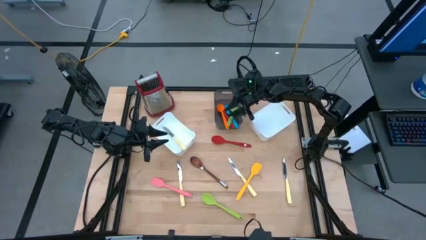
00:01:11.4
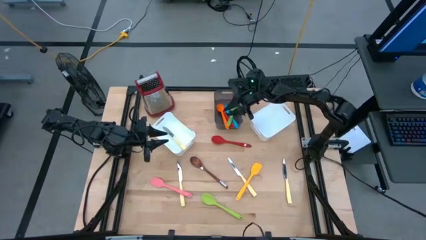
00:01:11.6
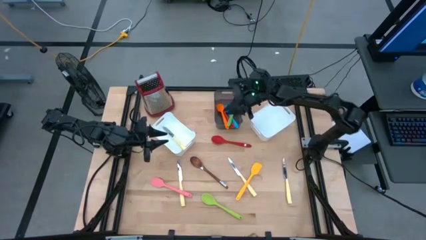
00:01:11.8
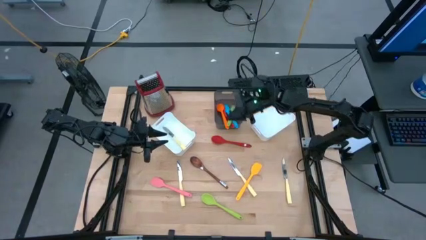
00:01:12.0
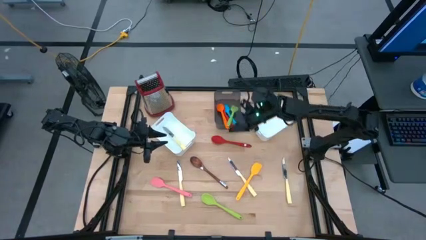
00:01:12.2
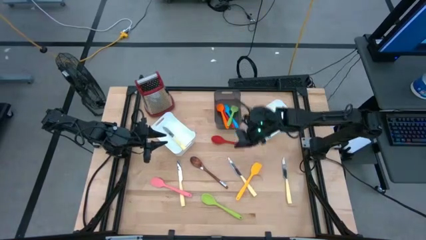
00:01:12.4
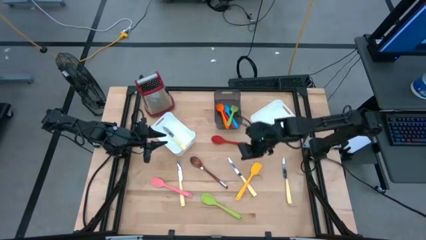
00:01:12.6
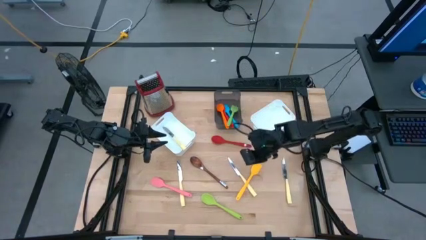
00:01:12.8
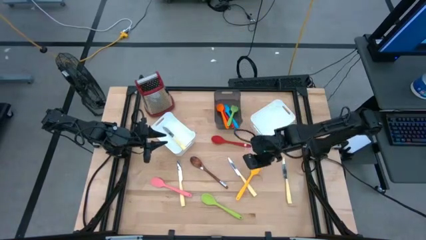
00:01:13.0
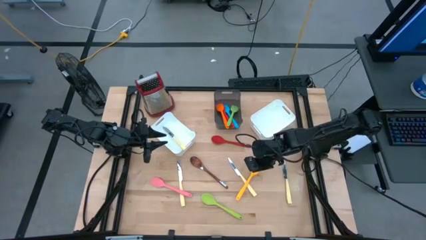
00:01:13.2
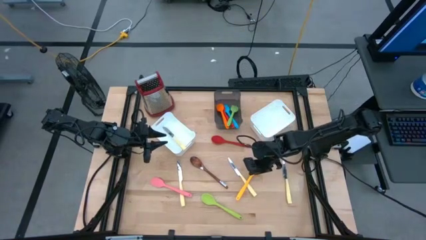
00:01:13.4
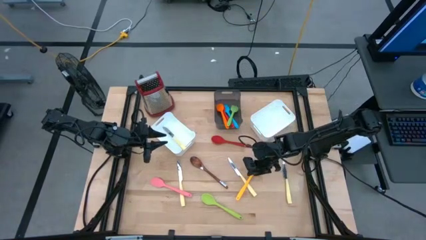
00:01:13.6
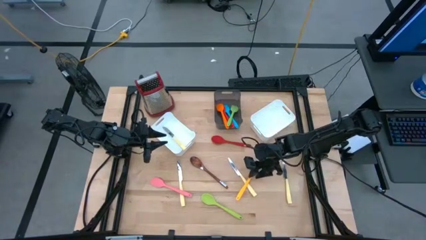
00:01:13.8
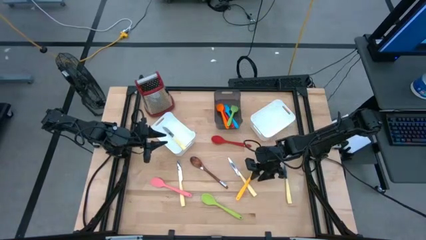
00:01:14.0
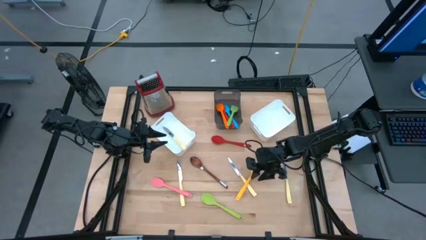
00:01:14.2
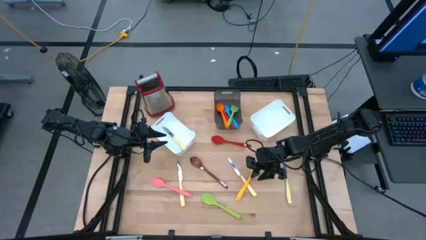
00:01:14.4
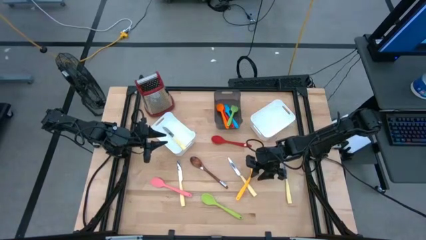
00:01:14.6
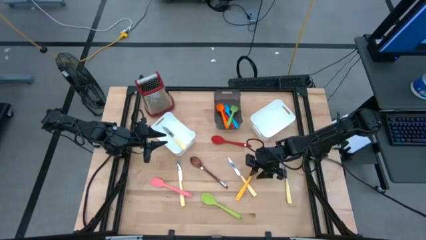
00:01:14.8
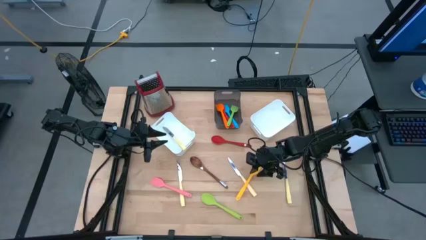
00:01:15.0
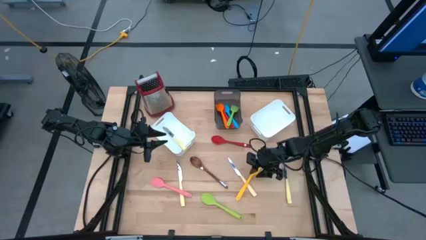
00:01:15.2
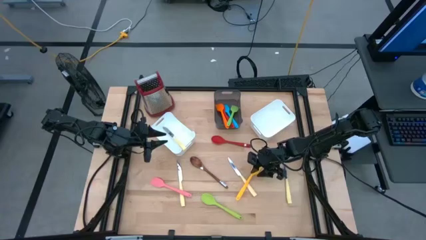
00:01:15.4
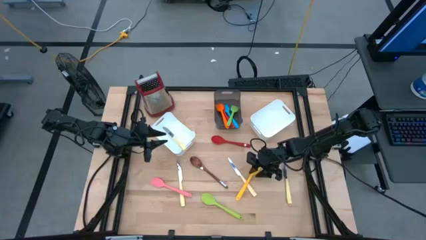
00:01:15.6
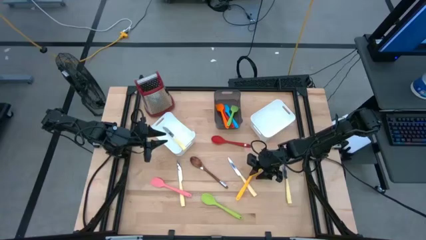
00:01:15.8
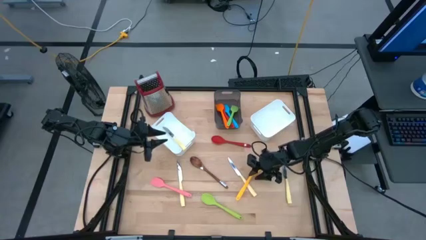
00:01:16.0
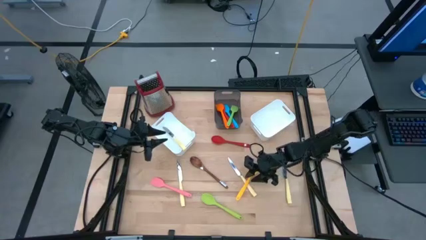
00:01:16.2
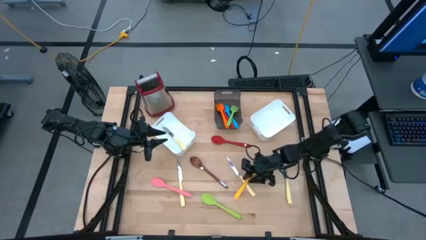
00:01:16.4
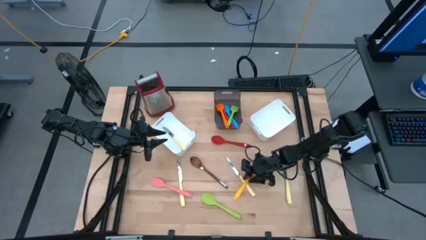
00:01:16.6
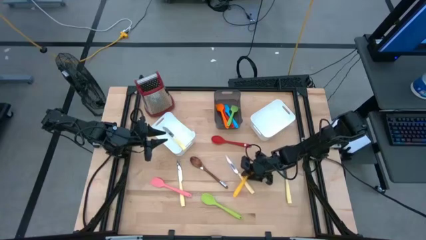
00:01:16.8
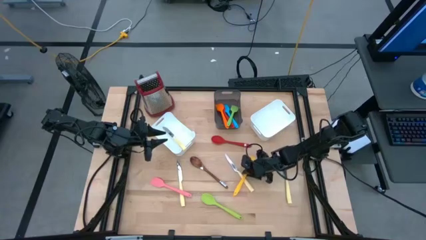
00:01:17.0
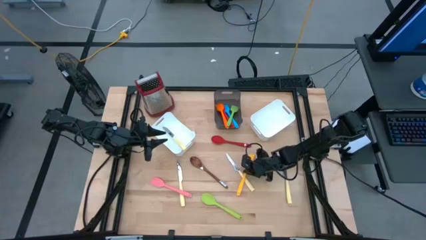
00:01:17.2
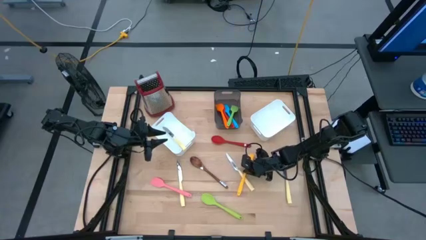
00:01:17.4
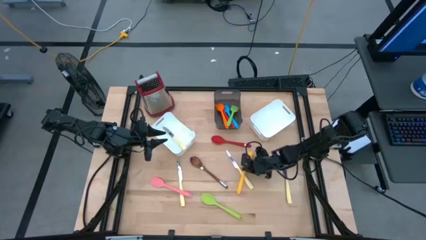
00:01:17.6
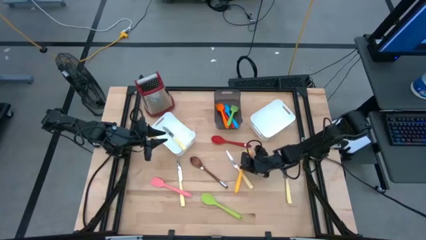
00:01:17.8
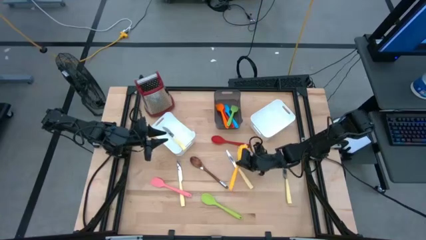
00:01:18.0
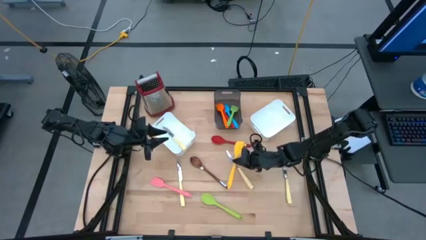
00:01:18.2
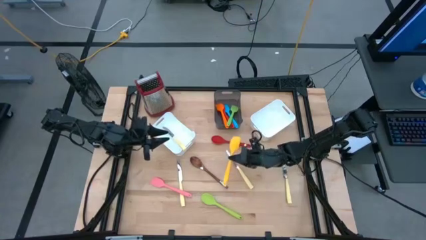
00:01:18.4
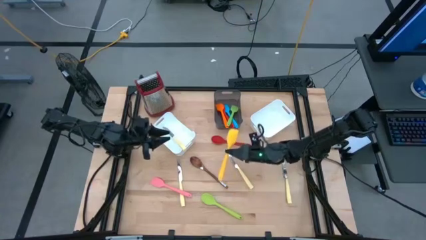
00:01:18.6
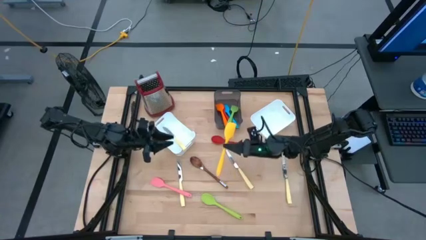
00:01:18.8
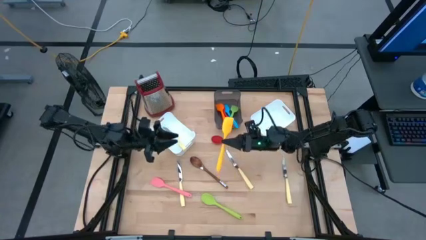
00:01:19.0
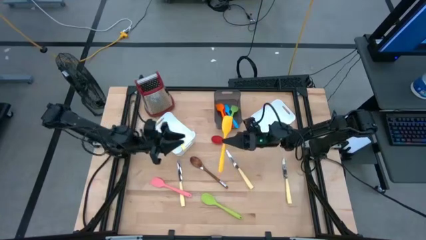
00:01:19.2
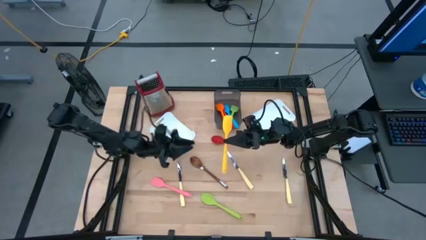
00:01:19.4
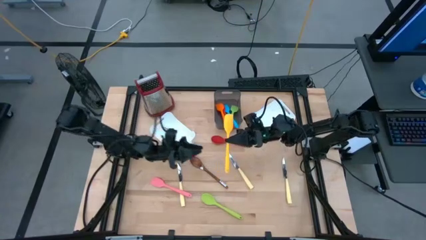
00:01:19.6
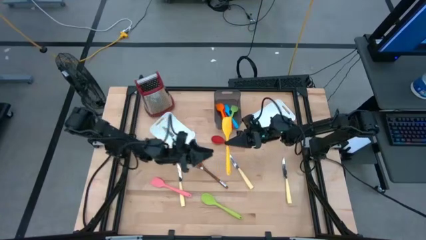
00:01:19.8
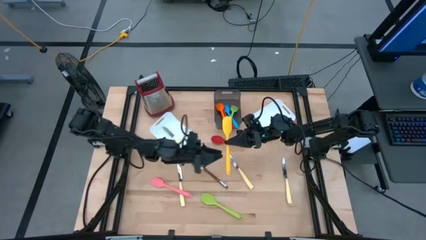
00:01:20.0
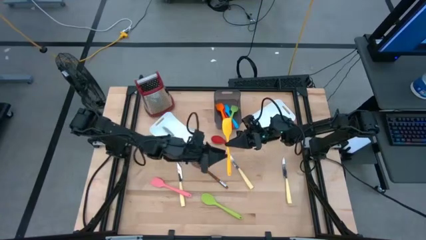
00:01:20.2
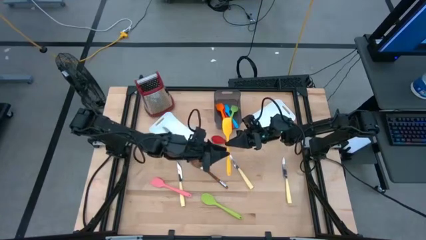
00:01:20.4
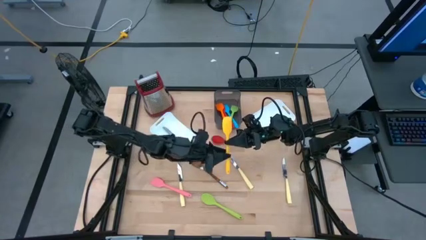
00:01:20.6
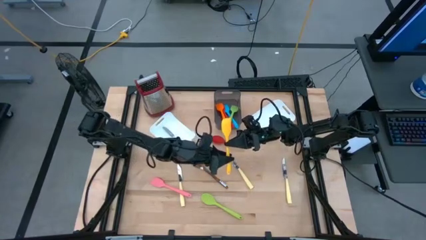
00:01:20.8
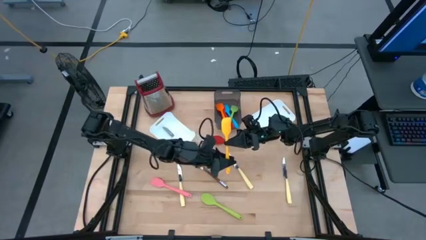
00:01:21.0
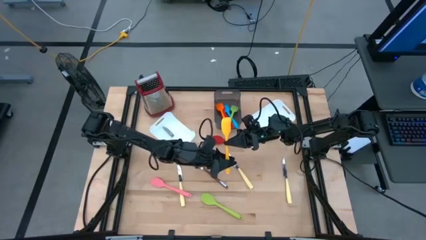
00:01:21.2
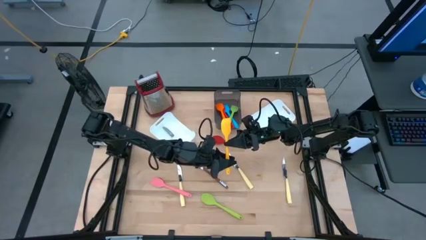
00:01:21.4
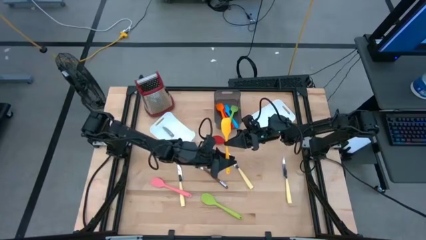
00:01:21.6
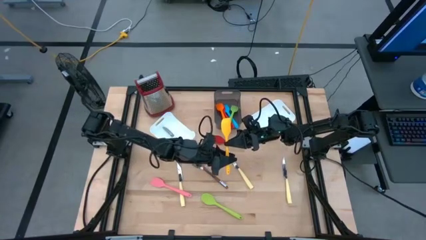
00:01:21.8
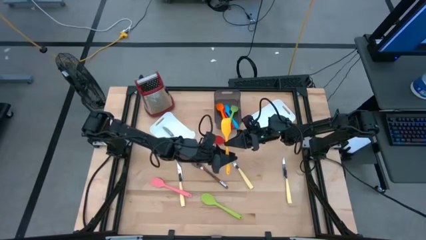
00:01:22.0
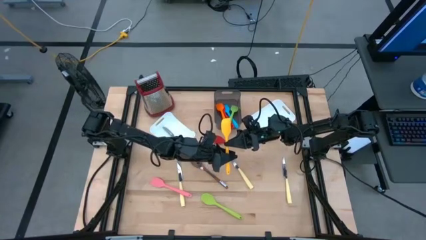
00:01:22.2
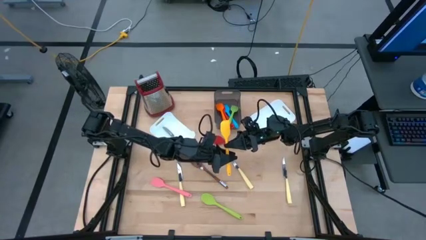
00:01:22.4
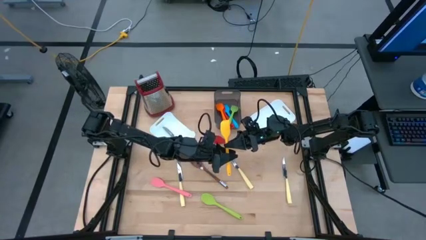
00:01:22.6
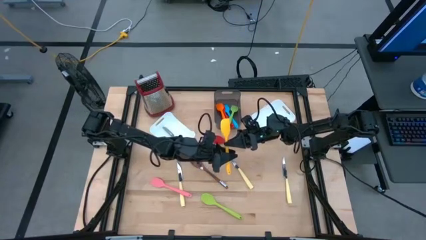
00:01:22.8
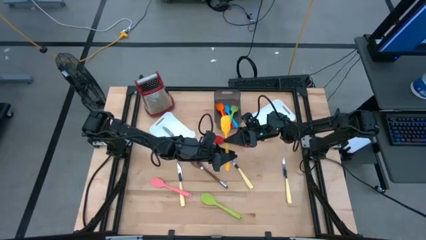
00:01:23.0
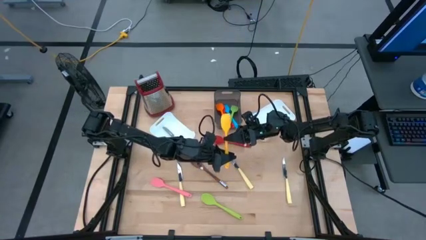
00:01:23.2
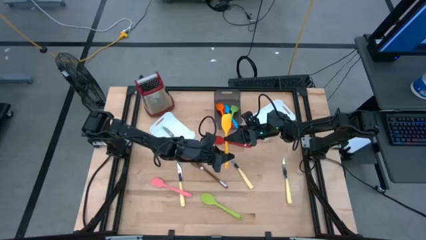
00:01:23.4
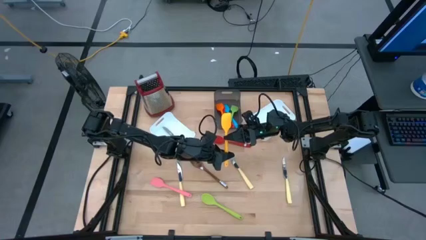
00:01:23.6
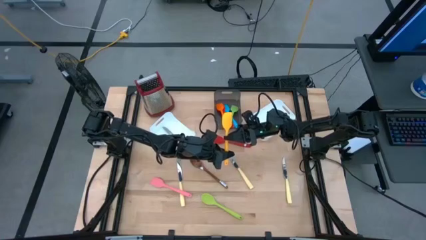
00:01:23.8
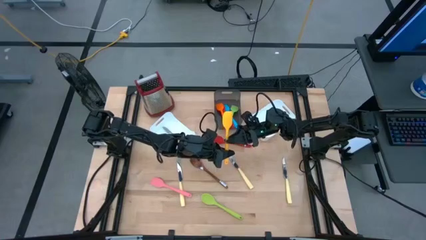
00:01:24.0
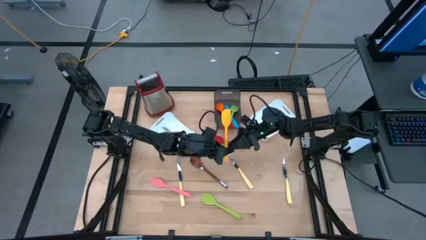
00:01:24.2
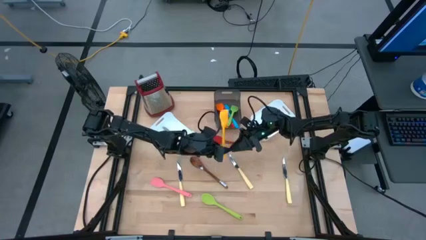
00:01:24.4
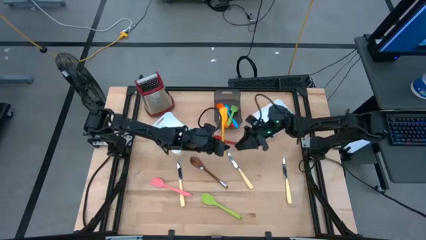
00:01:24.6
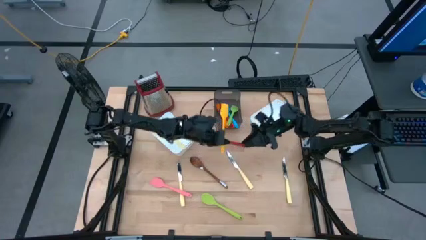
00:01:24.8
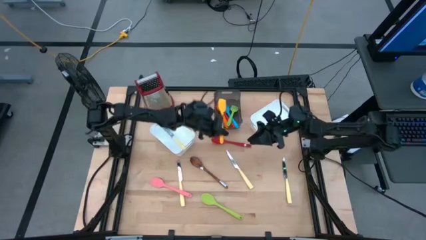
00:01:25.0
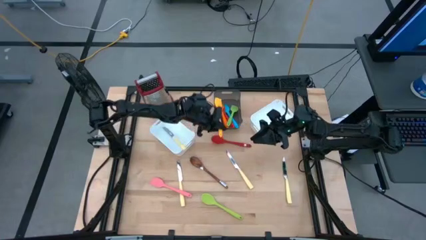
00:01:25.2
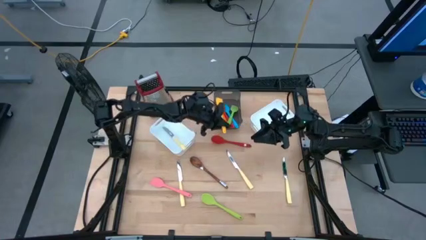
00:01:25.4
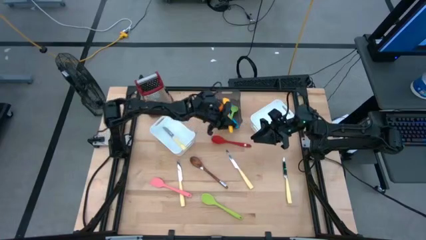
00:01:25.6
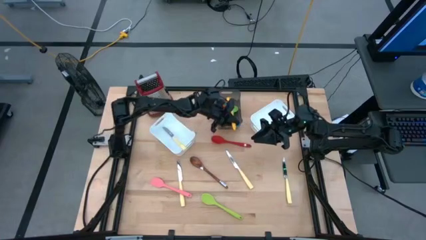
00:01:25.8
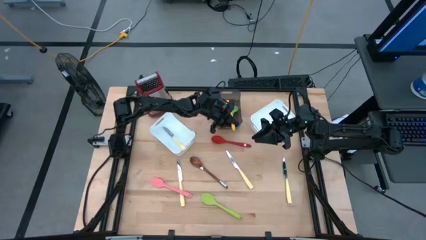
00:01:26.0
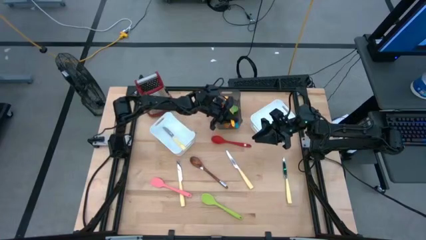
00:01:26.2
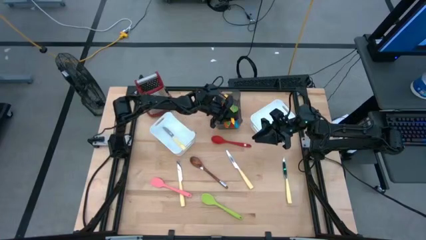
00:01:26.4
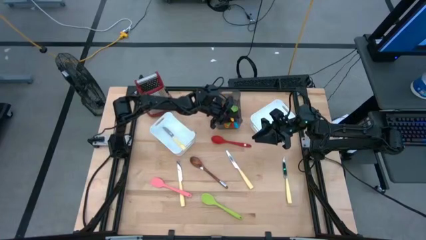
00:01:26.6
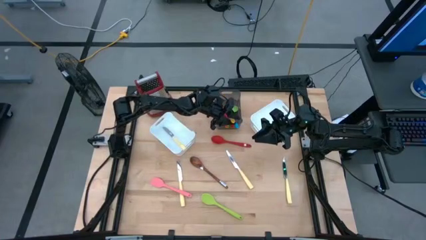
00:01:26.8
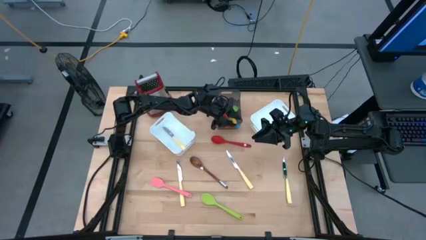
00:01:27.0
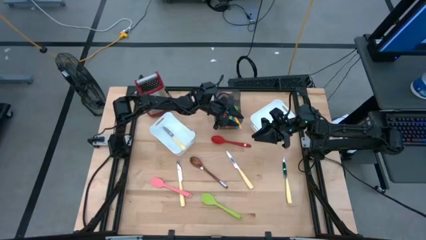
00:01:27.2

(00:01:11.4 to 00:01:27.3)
Task: Pick & Place Kitchen Items
Put the yellow spatula into the black bin
